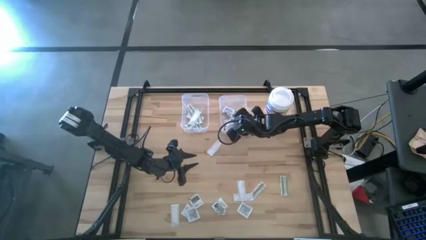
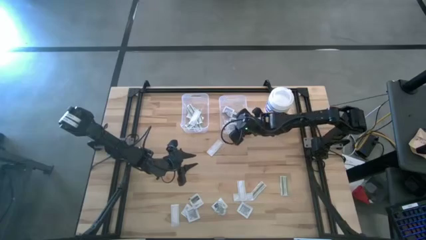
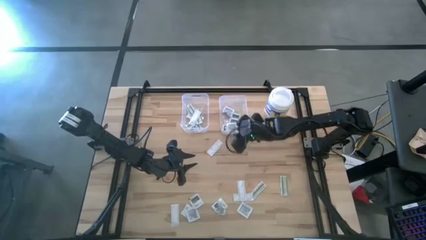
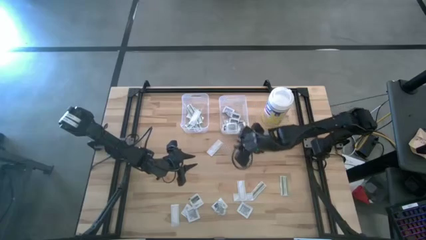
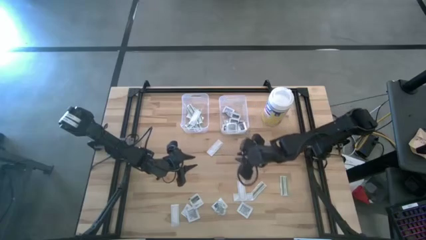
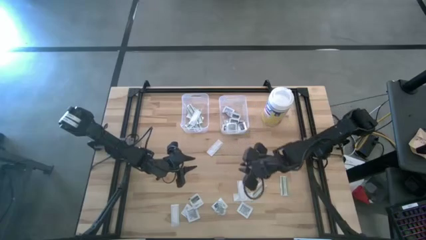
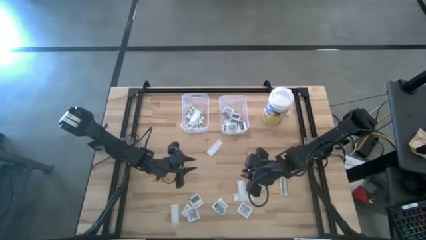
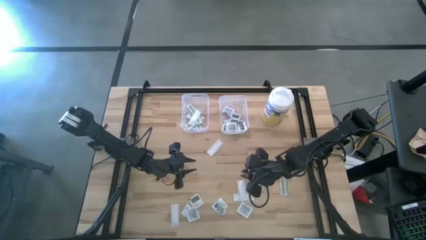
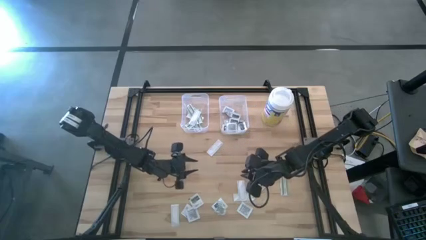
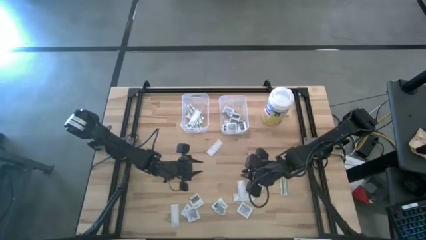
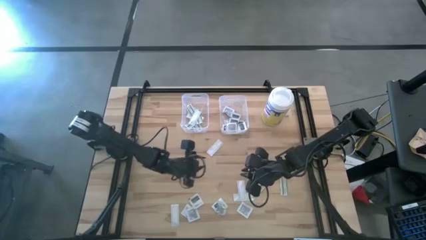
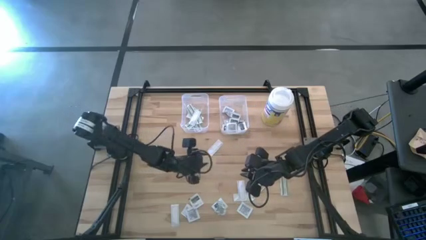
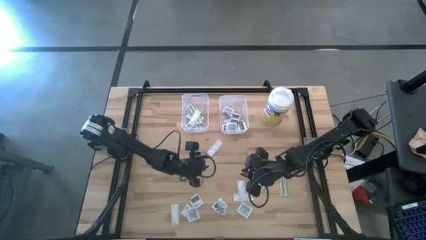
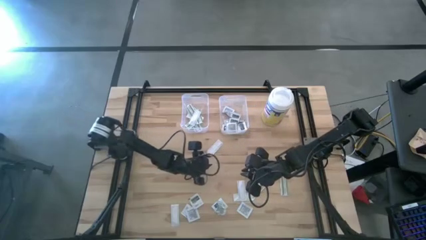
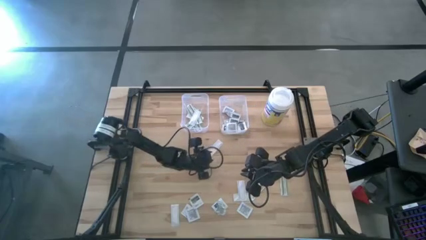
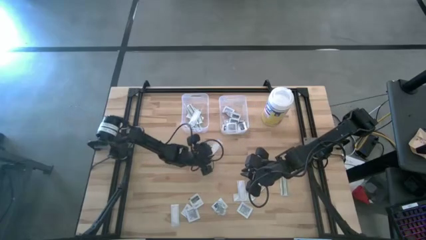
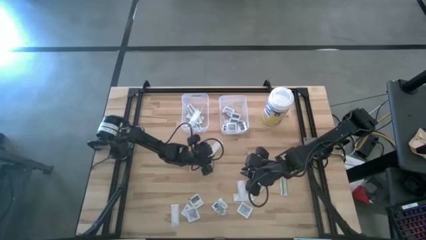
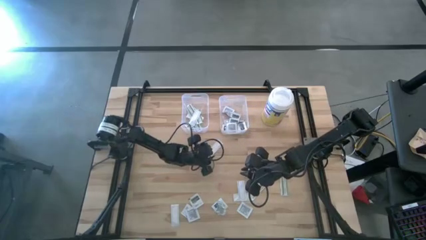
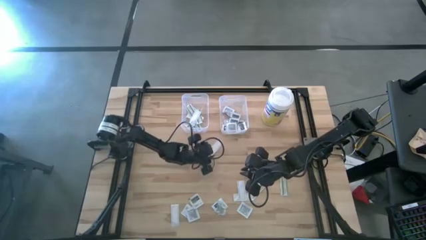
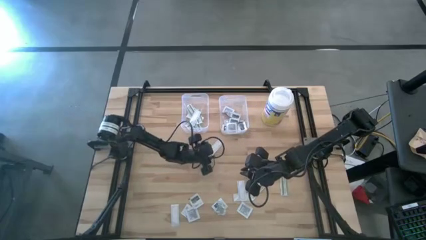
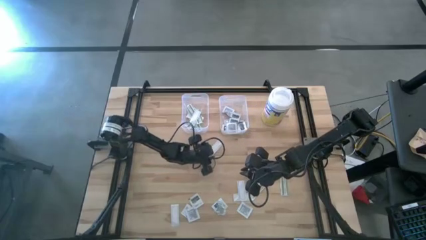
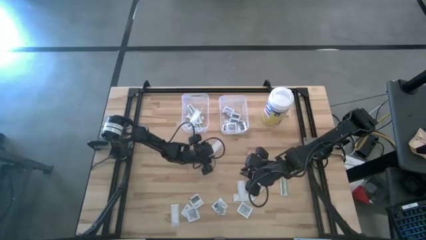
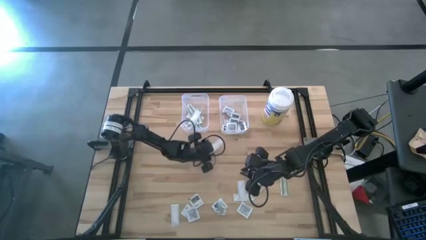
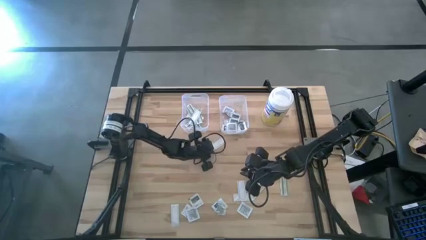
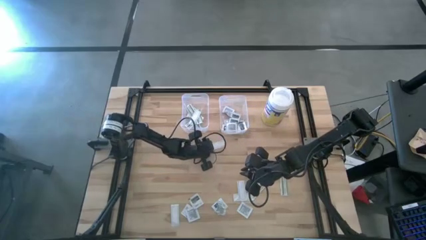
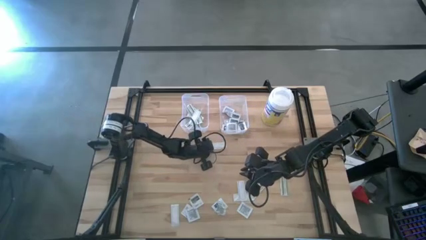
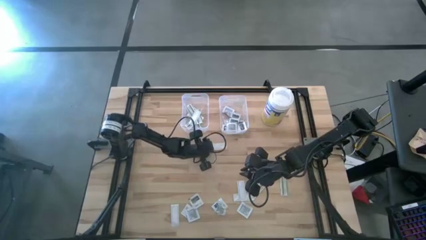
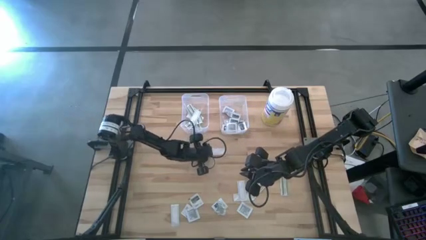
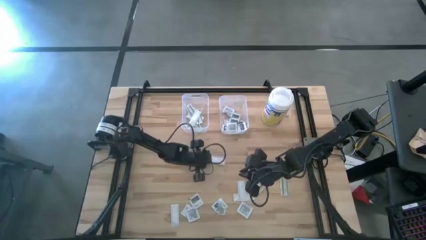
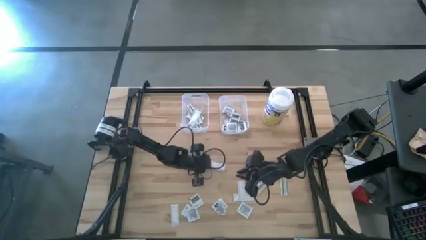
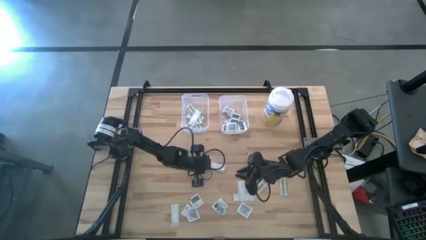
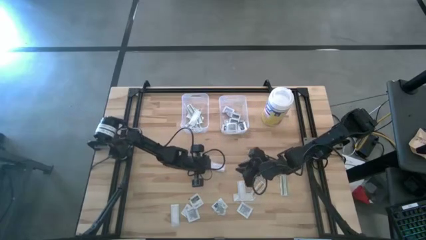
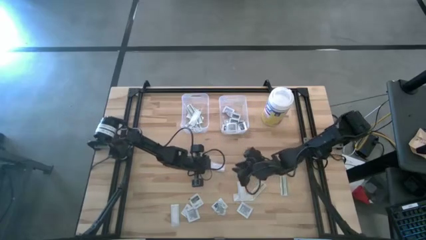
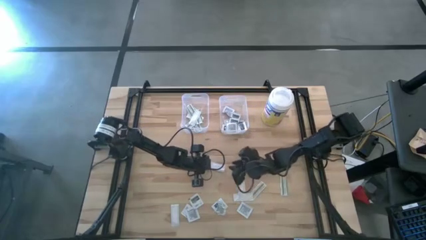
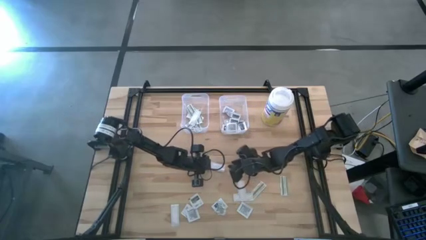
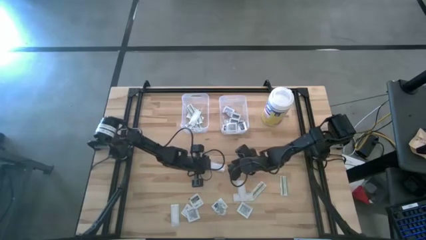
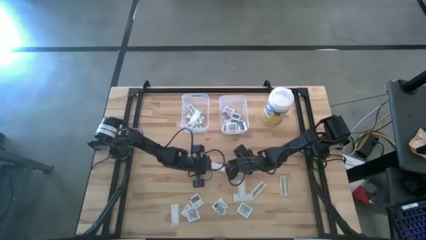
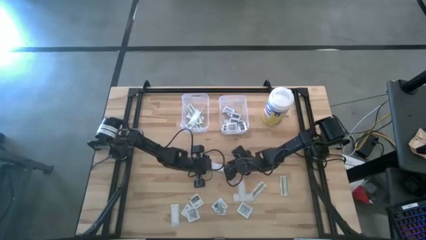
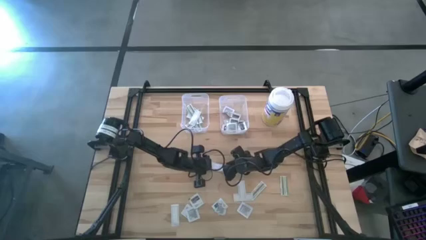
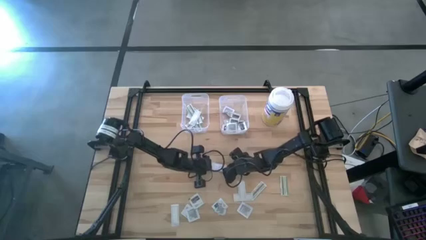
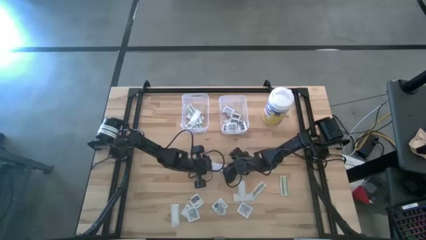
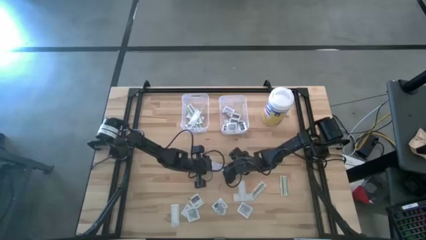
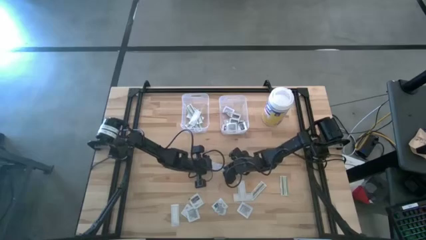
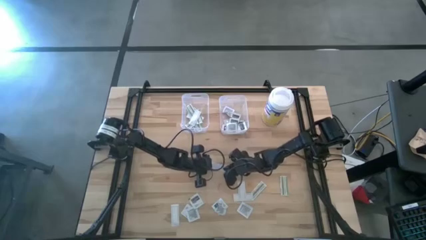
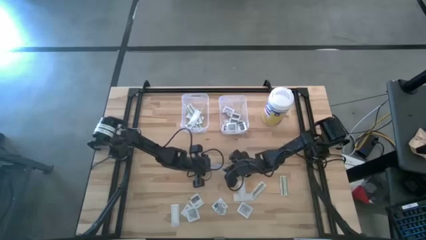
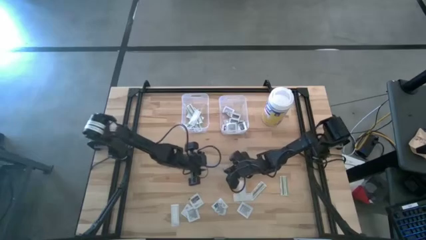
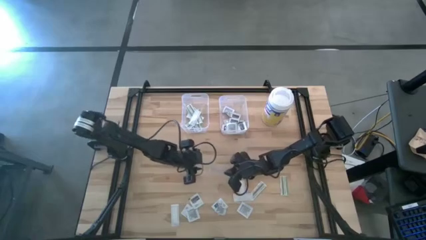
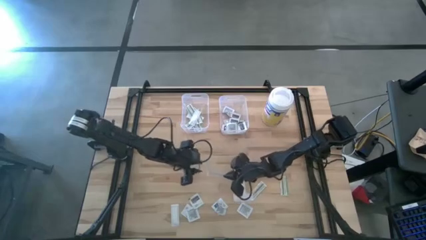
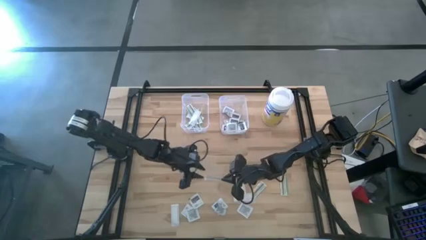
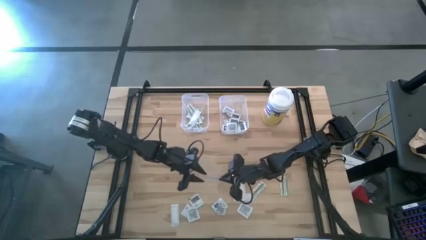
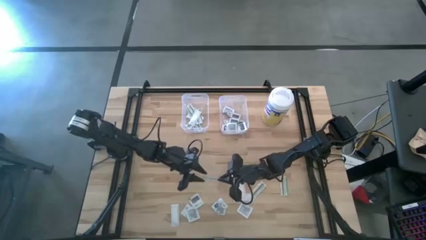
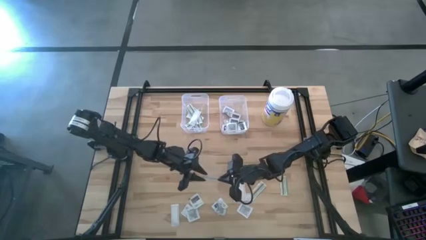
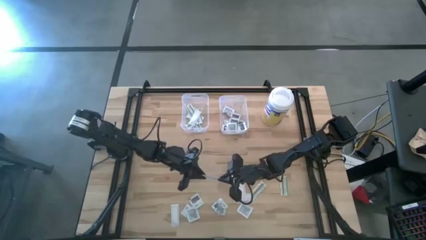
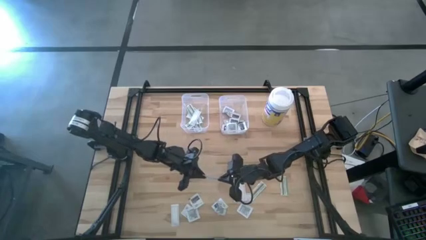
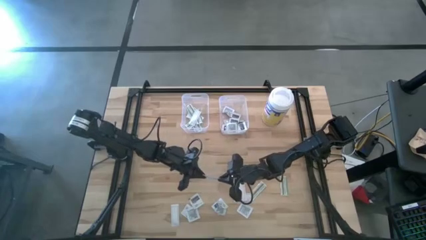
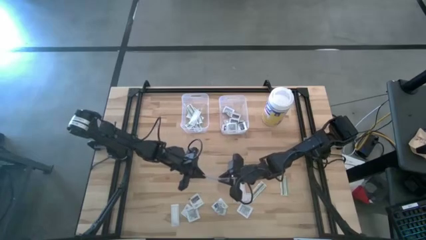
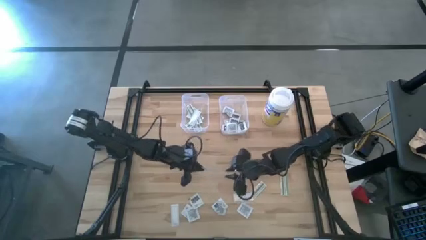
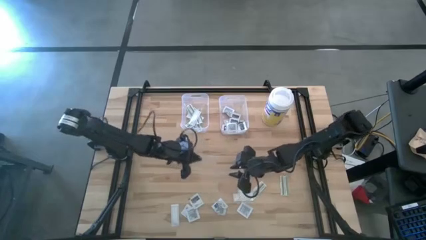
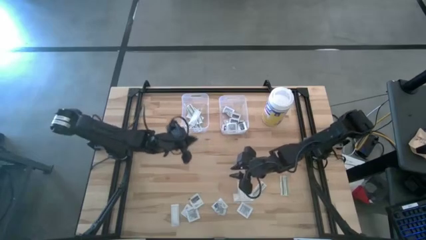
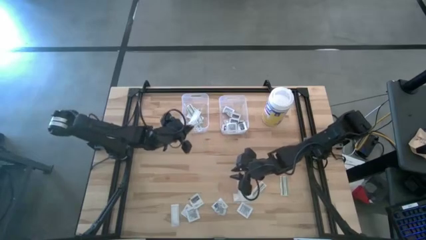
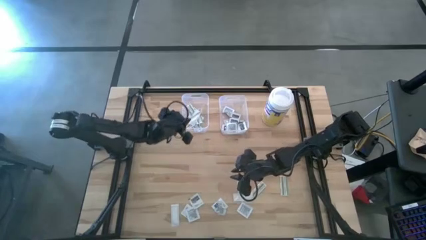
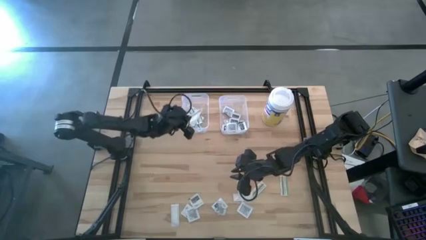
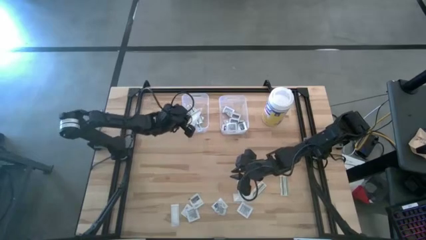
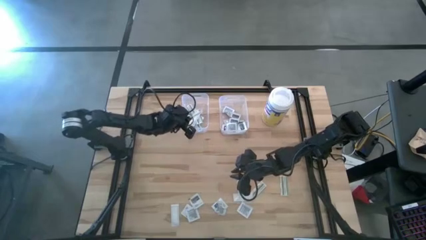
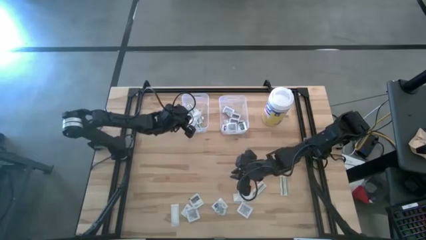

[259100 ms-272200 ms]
Task: Pick & Place First Aid Supplies
Put the green bandage pack into the left transparent bin
